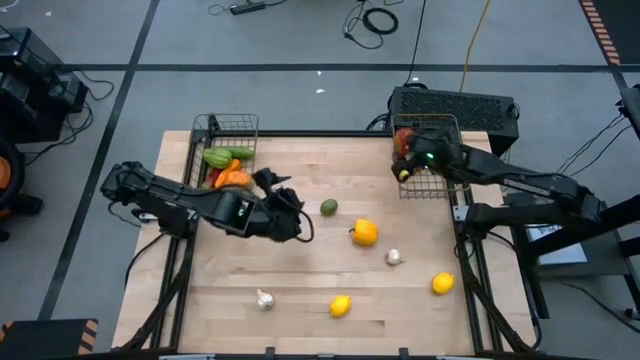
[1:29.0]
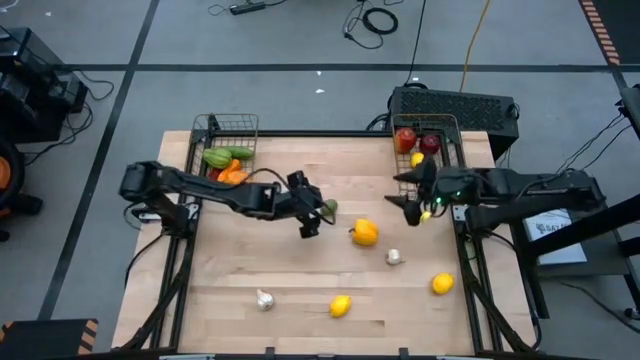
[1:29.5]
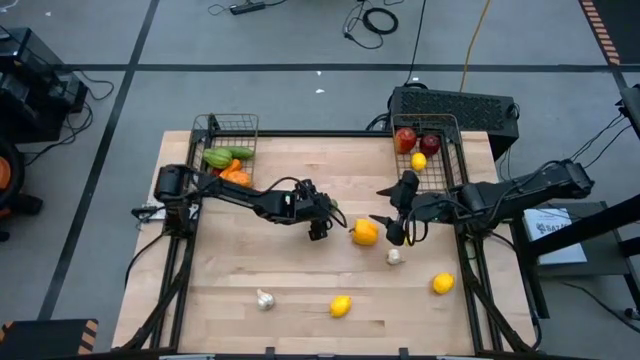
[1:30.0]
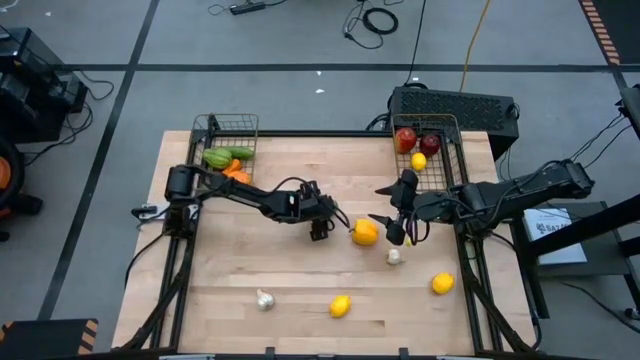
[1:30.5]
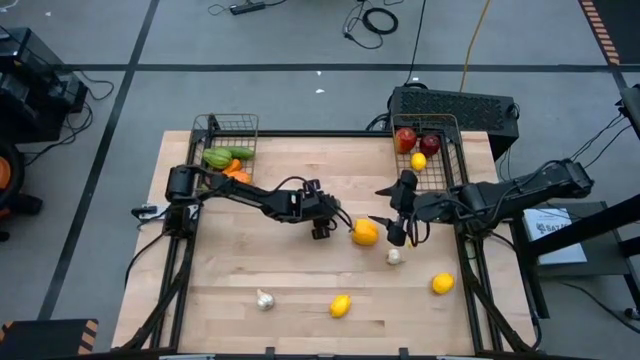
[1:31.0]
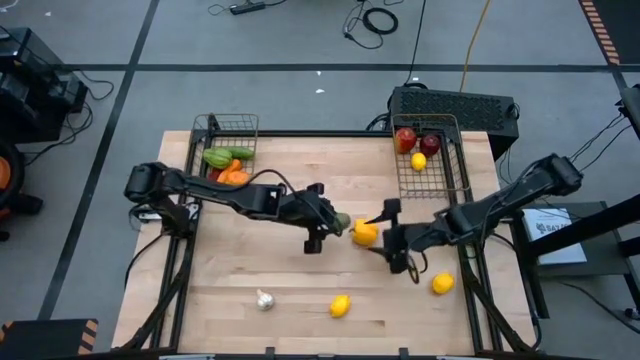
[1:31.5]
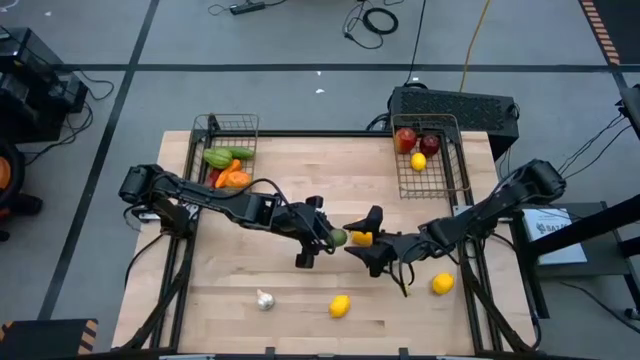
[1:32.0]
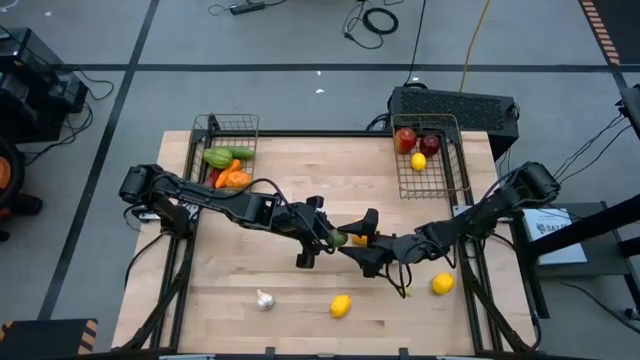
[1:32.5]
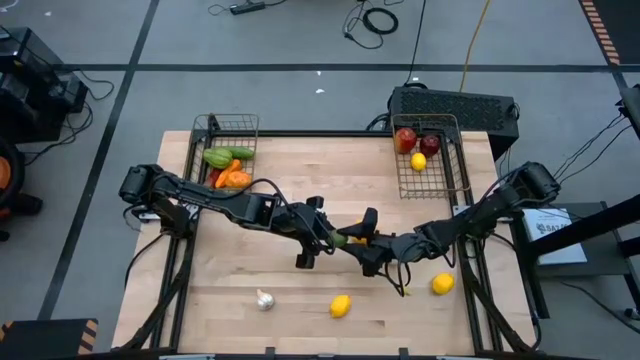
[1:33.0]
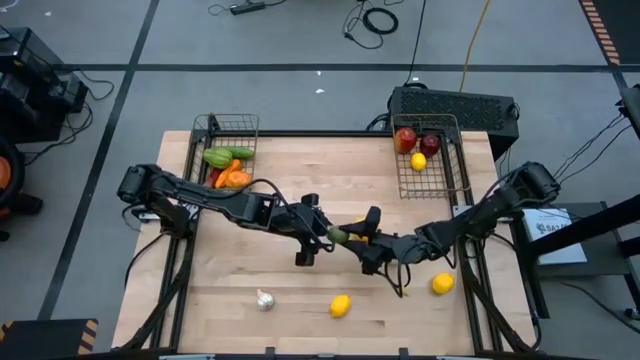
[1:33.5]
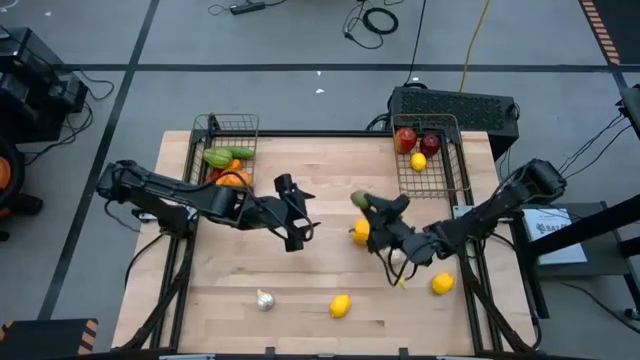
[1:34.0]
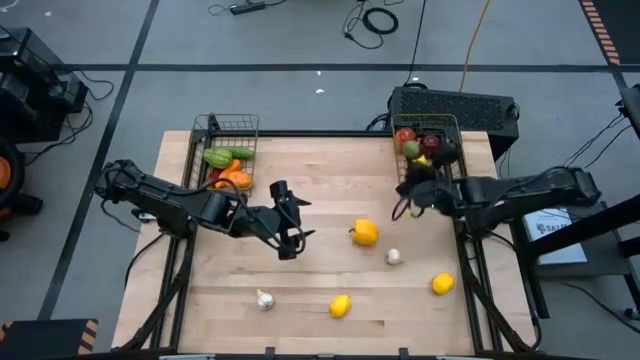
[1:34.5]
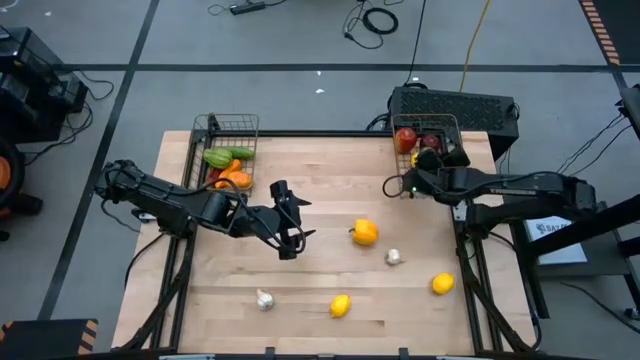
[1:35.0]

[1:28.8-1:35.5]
Task: Sort produce into baskets
Put the green lime into the right wire basket

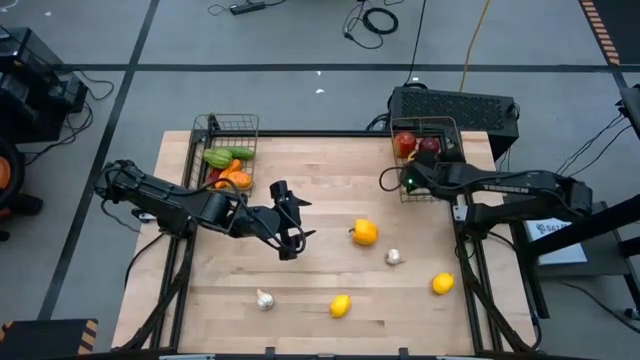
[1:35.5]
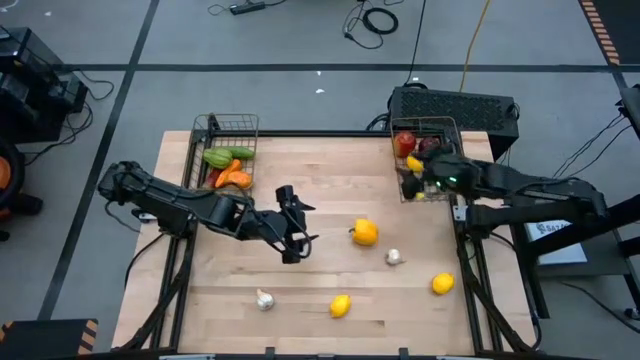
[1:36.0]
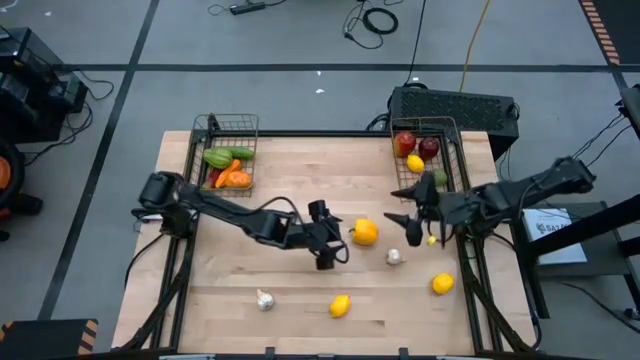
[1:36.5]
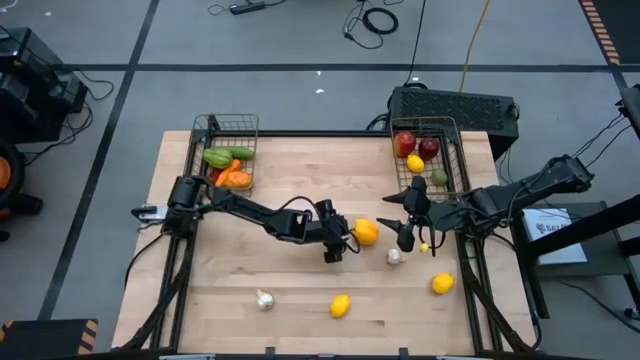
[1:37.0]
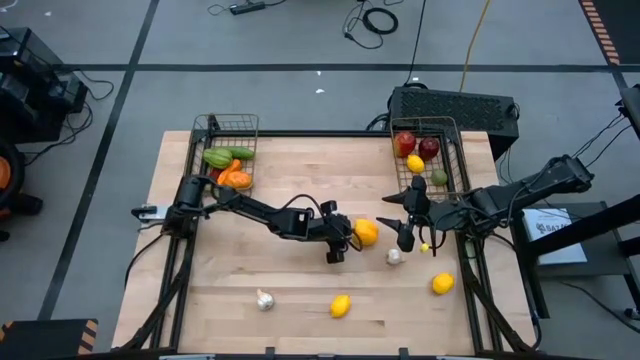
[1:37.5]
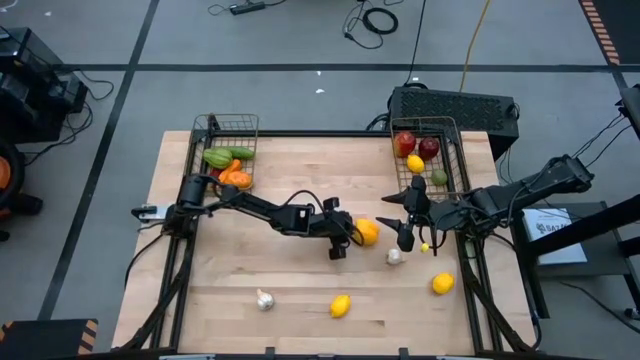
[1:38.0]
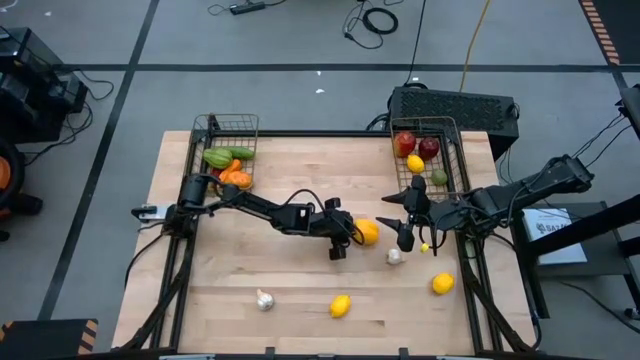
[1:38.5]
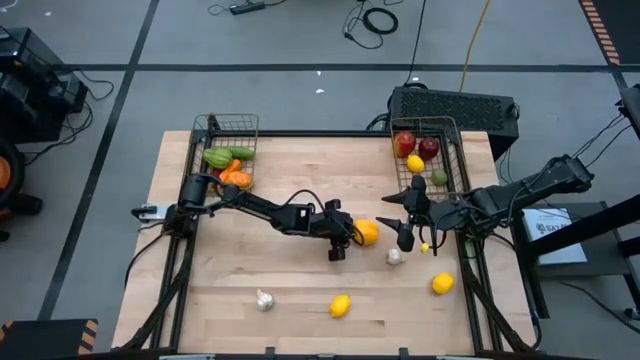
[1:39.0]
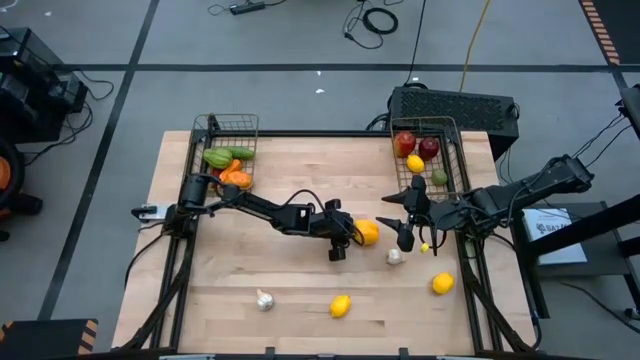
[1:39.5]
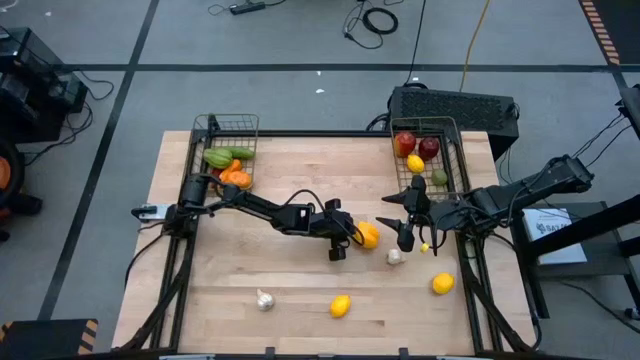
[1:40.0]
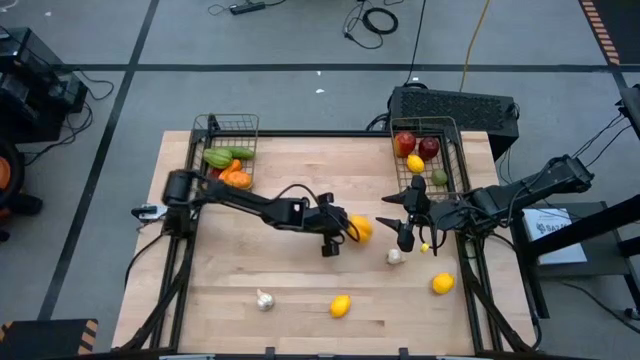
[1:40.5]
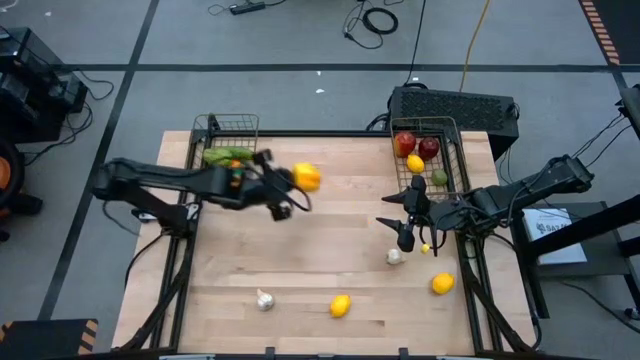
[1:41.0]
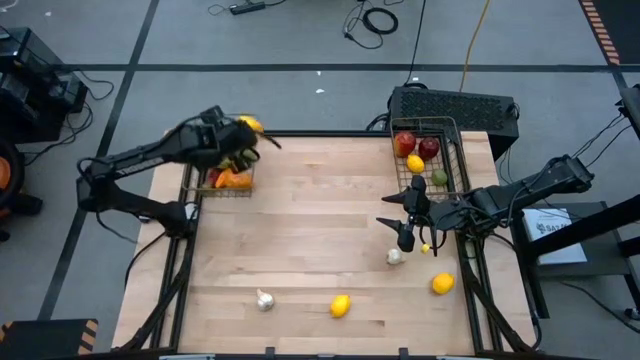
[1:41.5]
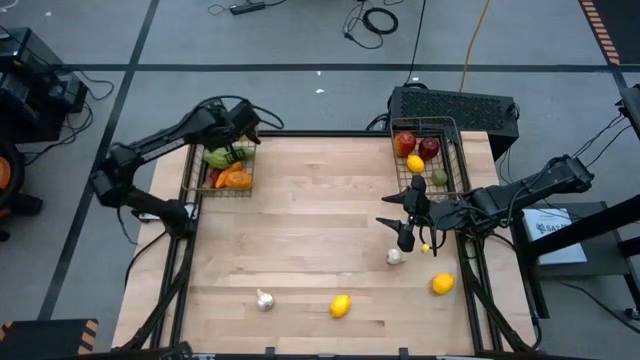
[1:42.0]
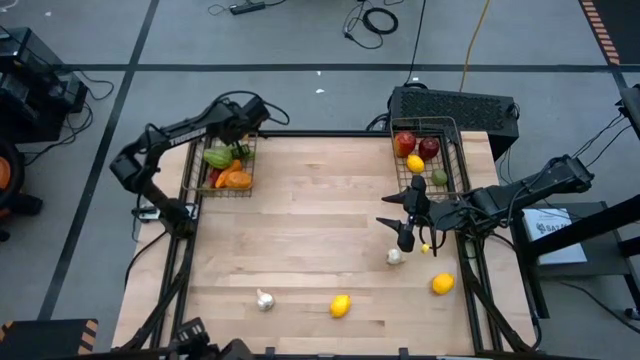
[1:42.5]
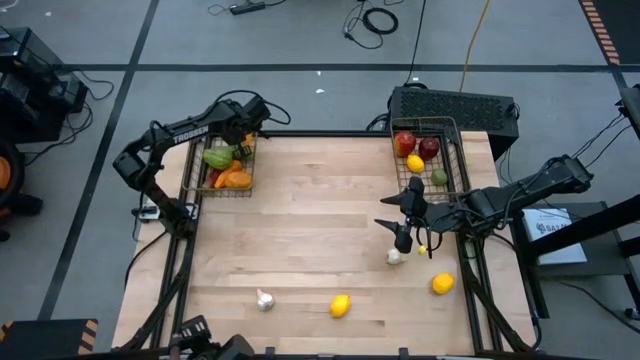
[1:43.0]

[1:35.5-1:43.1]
Put the yellow bell pepper into the left wire basket

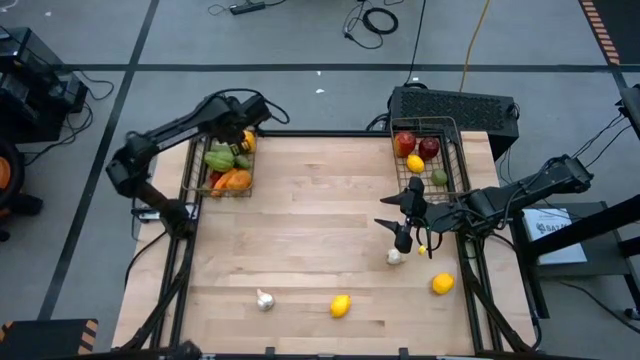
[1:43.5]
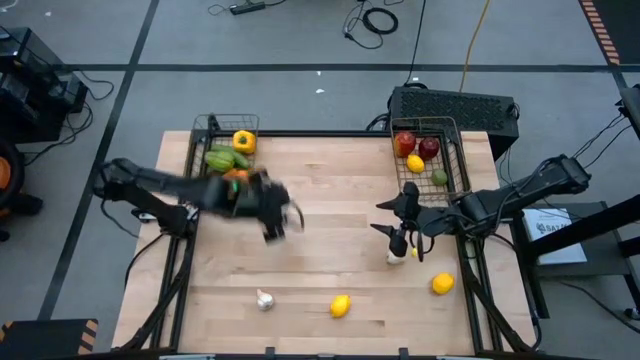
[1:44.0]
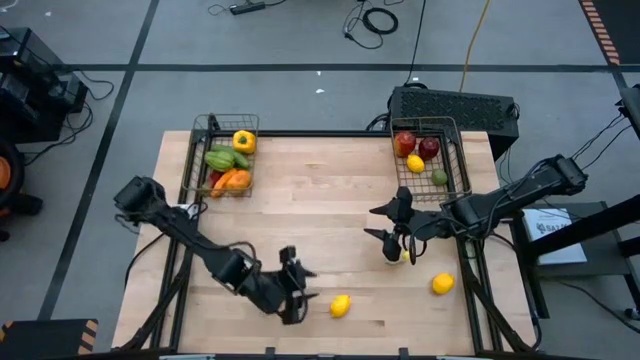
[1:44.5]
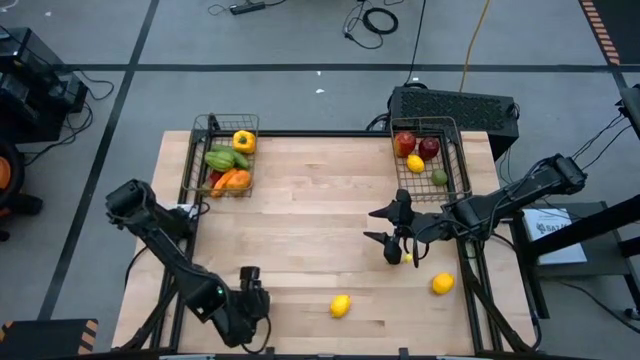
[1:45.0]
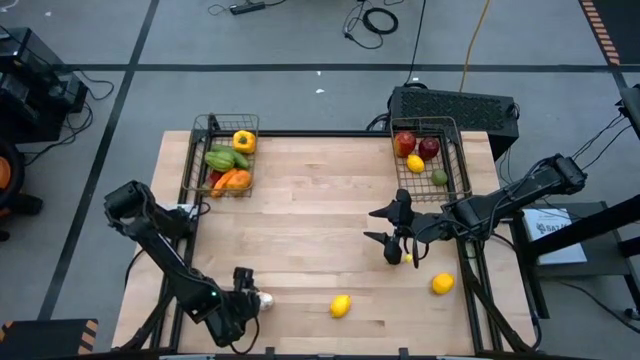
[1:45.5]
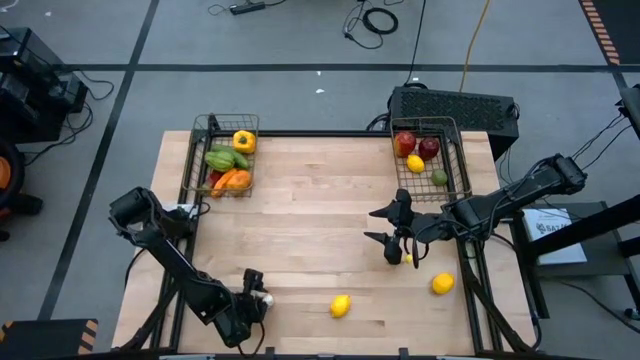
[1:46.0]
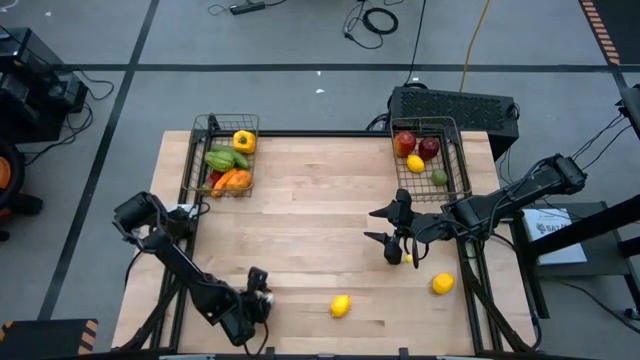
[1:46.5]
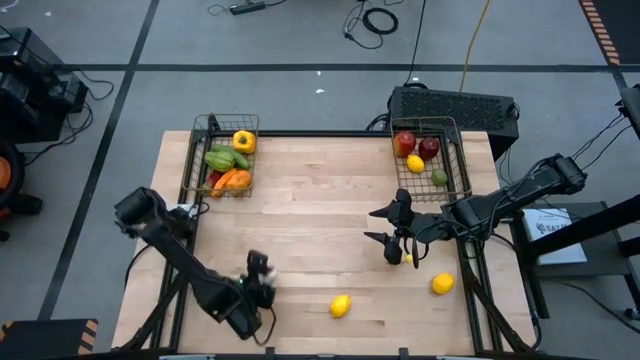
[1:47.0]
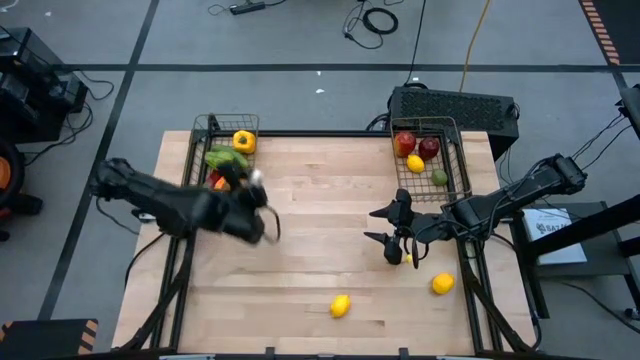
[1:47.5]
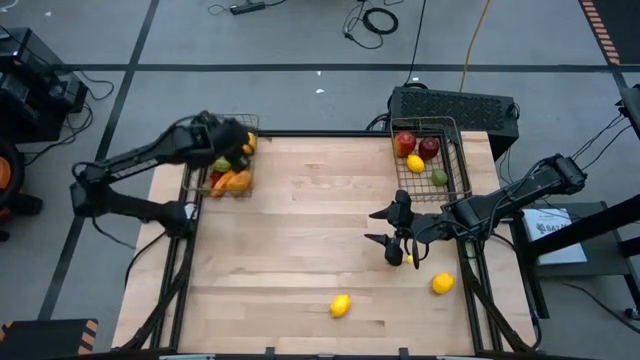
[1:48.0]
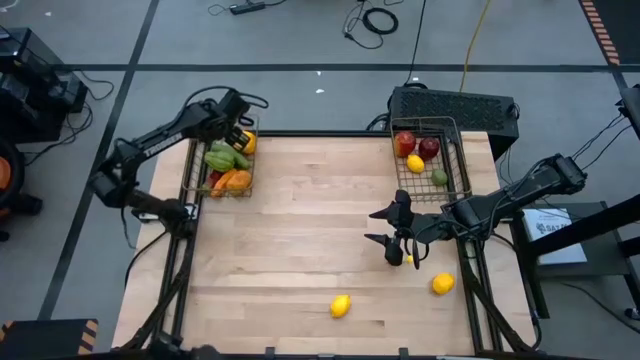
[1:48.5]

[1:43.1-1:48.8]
Put the left white garlic into the left wire basket
